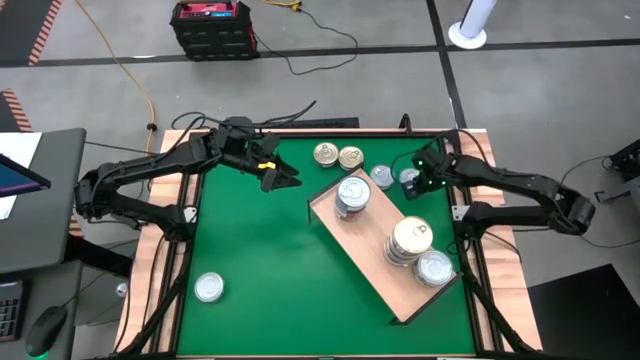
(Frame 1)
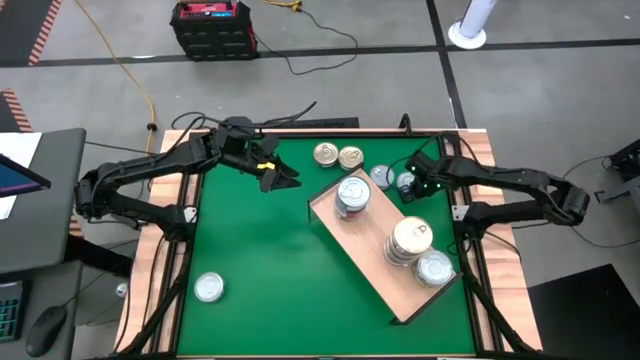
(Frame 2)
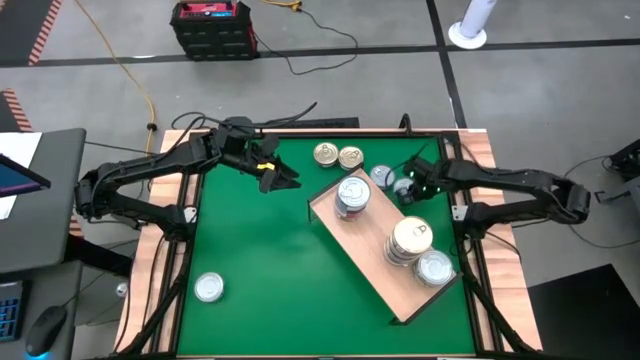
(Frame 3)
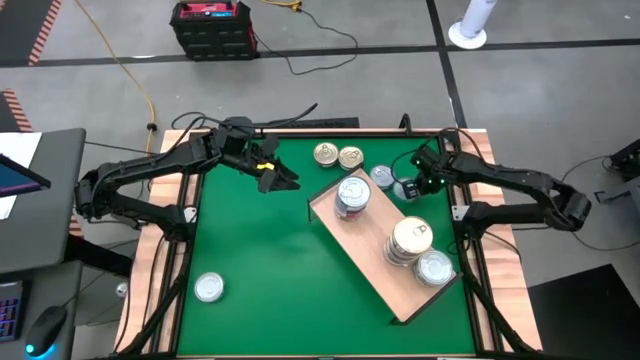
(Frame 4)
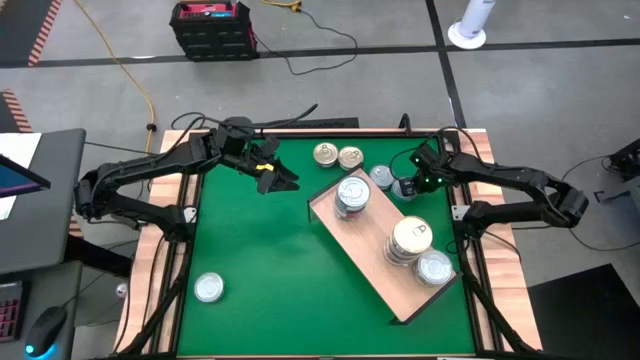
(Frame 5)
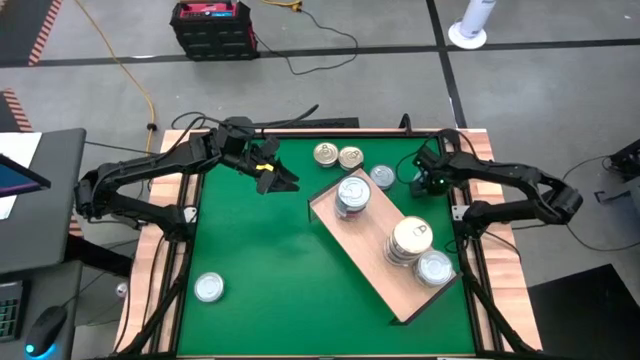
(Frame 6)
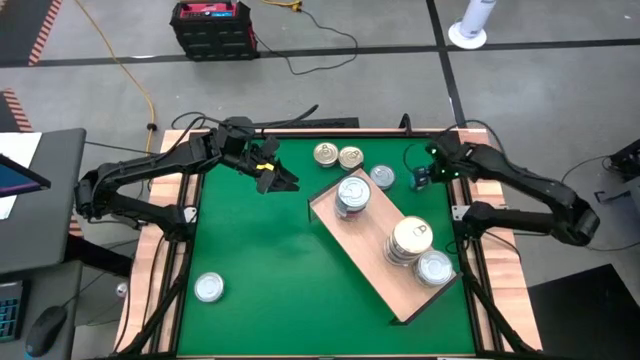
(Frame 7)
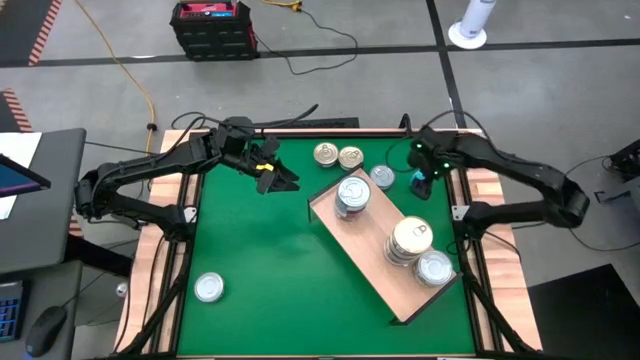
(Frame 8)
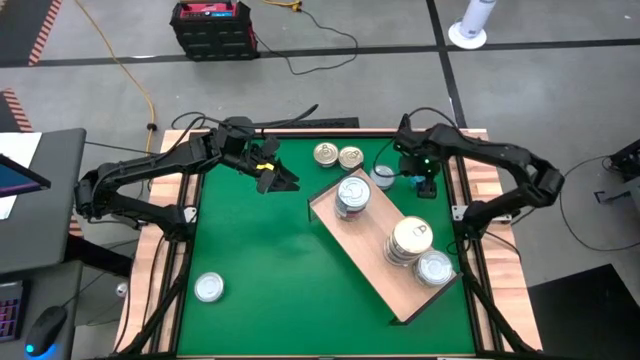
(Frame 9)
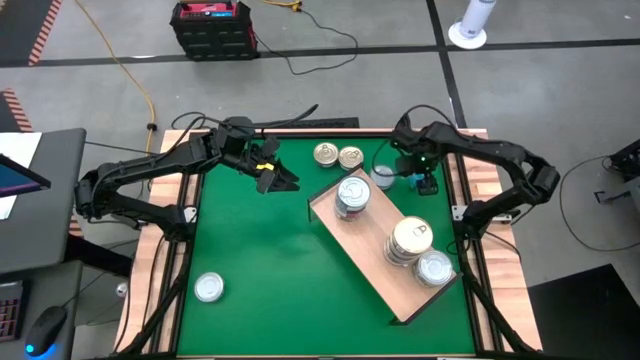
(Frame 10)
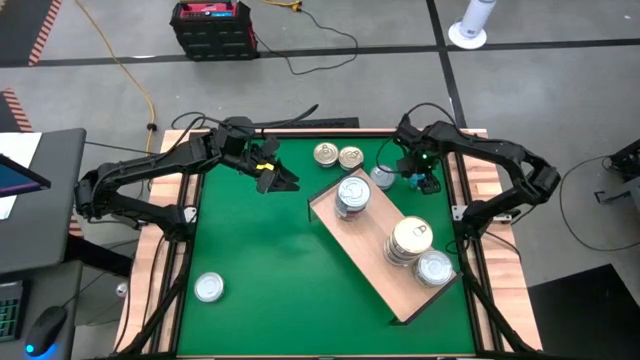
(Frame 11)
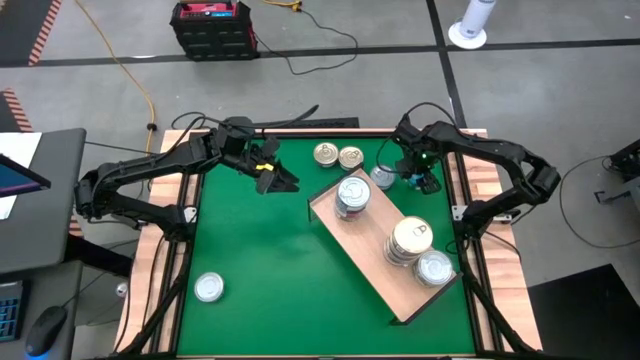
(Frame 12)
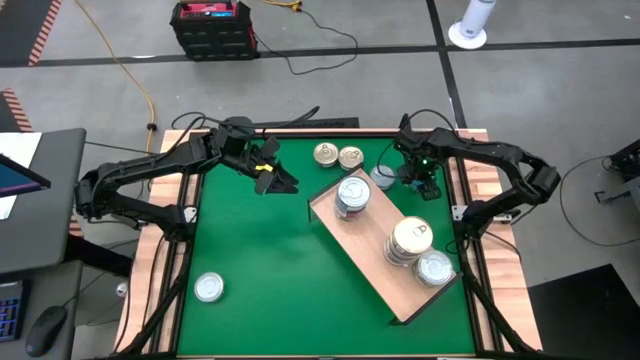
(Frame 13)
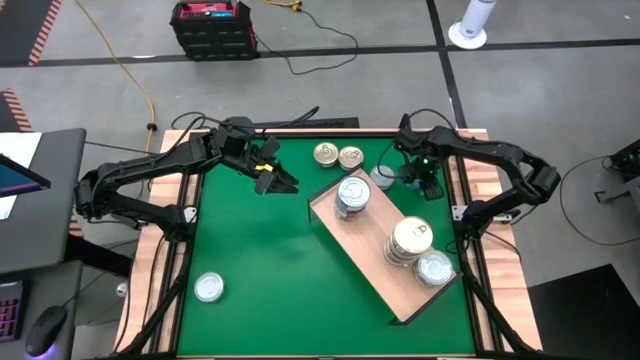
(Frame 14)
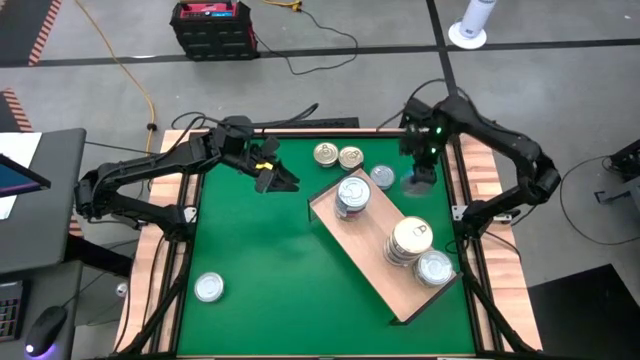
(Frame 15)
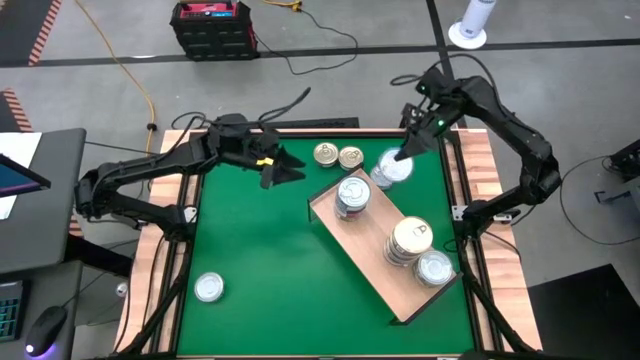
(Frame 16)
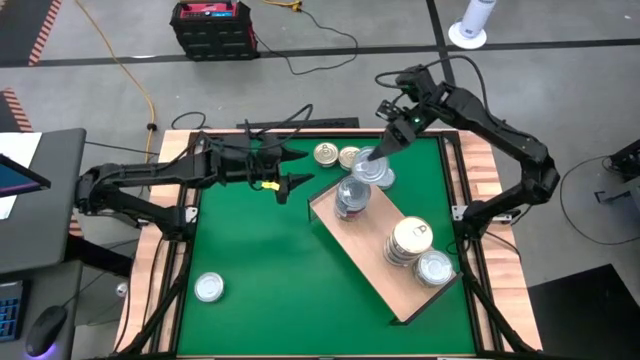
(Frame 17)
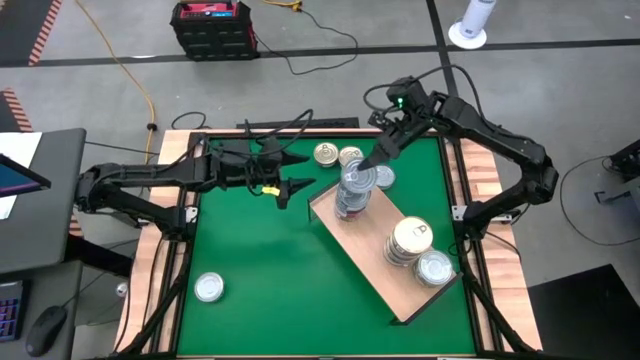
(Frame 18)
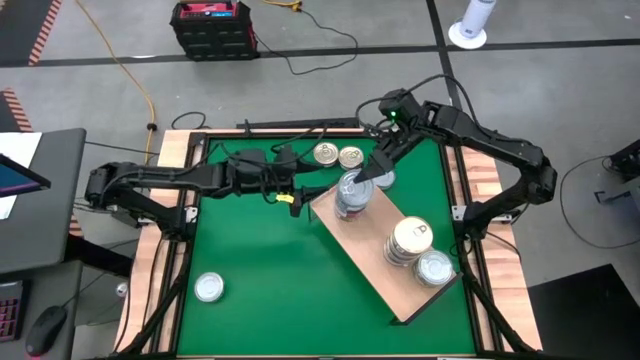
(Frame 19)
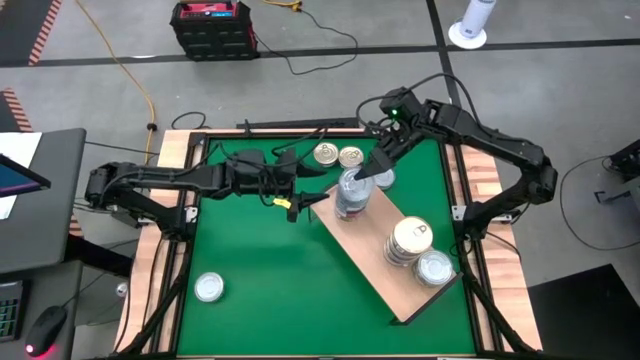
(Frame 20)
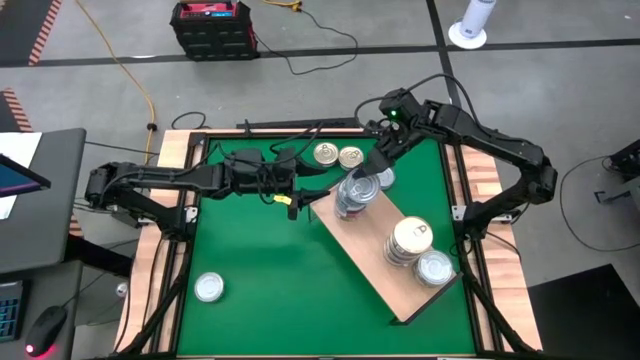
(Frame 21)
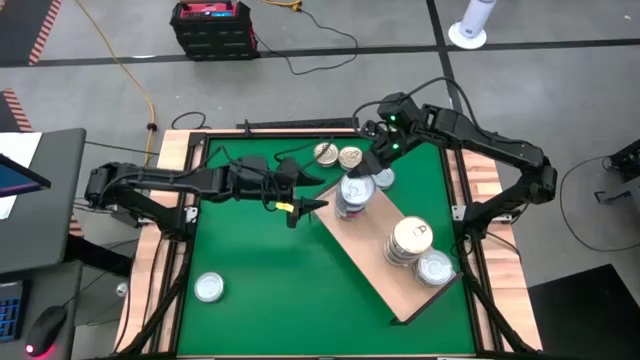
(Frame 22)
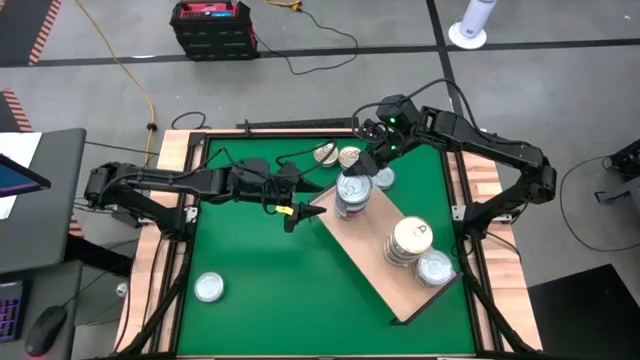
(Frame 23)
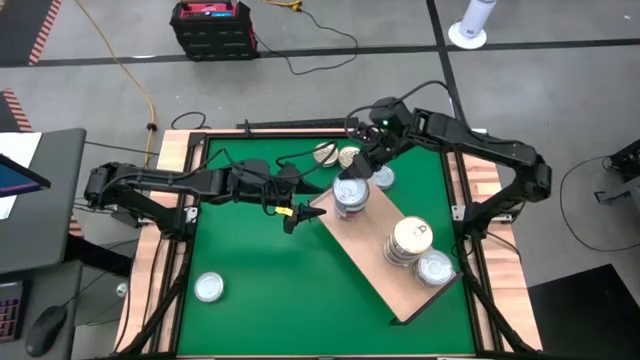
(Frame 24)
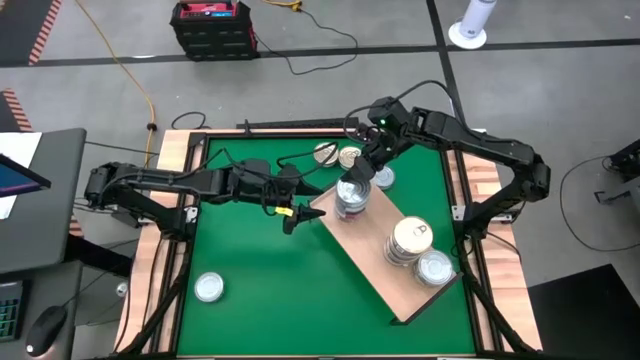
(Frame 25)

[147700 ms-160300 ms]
Task: Stack canned seafood by type on shelf
Stack the light blue tuna can on top of the blue tuna can on the shelf

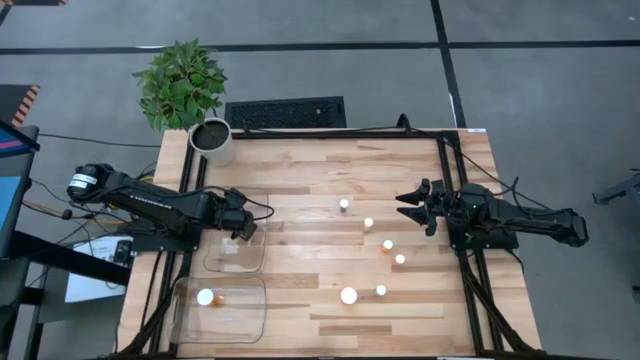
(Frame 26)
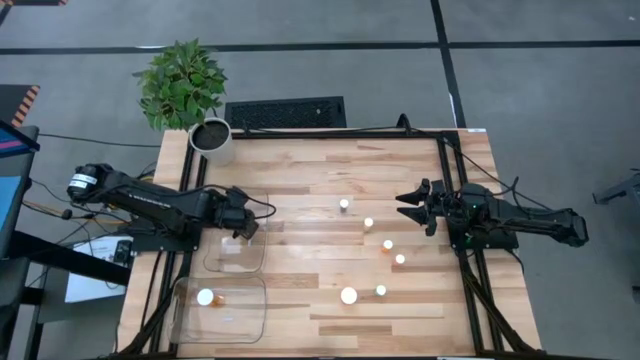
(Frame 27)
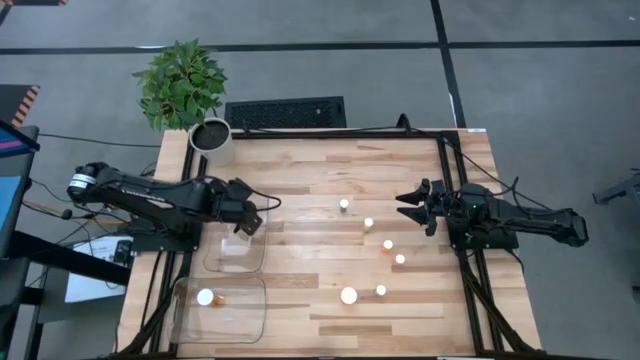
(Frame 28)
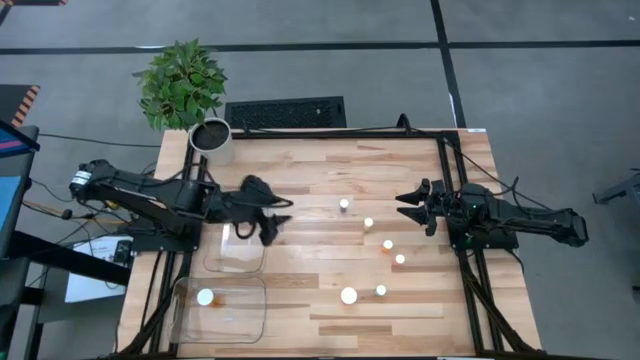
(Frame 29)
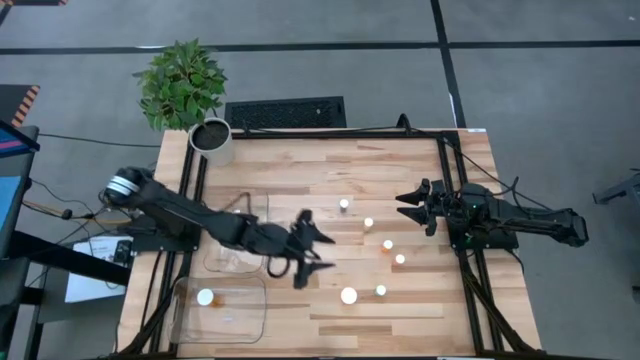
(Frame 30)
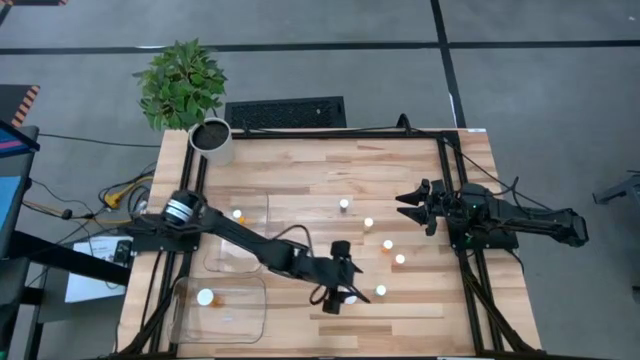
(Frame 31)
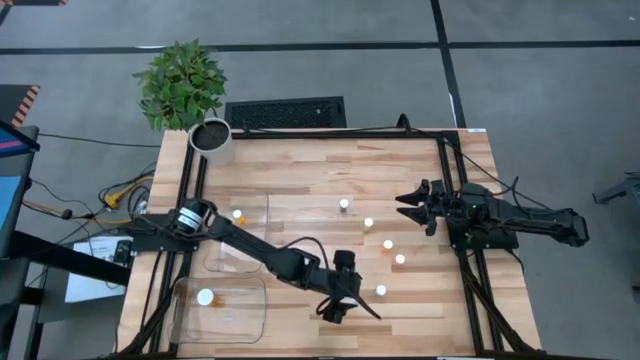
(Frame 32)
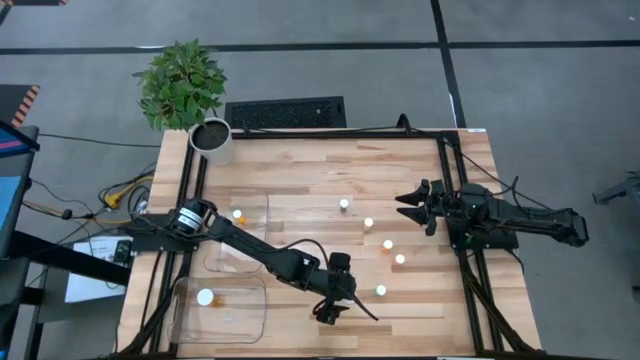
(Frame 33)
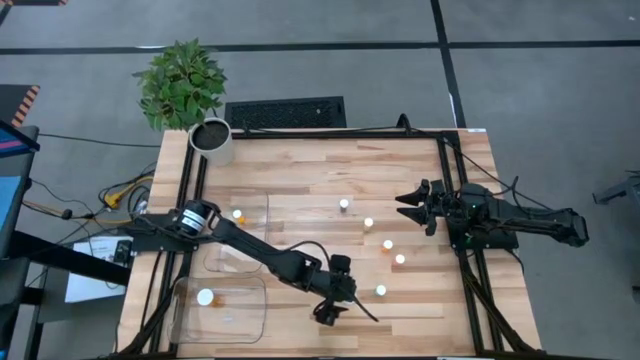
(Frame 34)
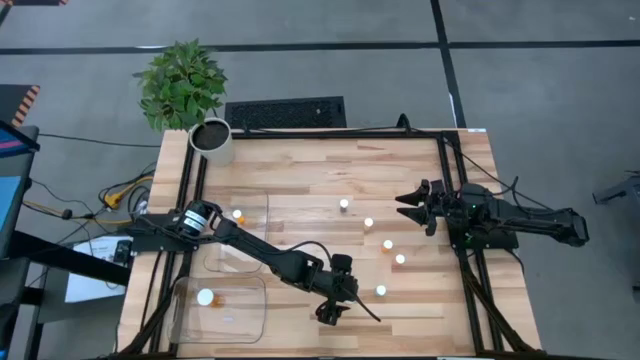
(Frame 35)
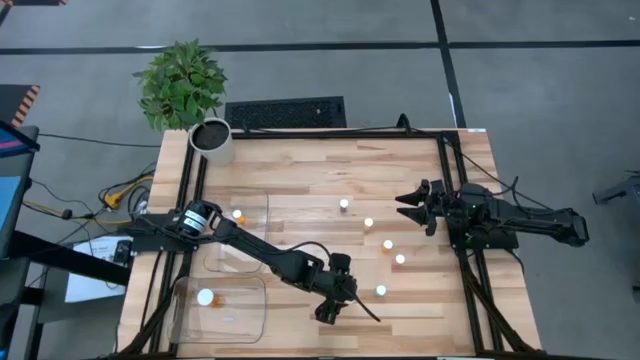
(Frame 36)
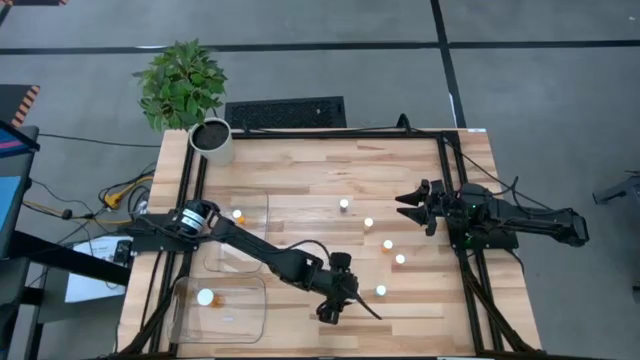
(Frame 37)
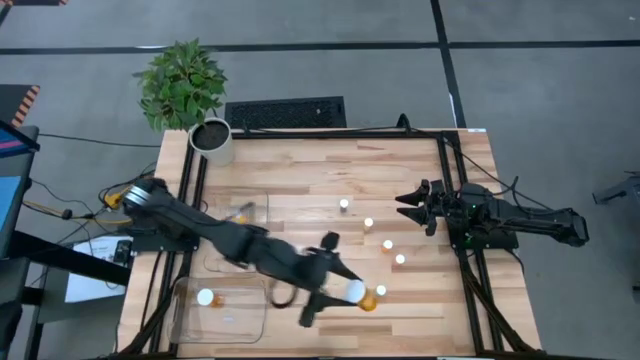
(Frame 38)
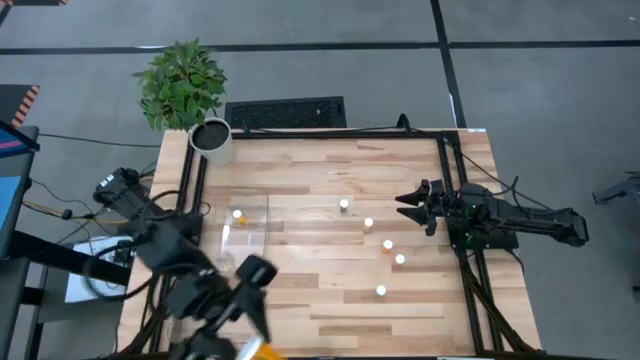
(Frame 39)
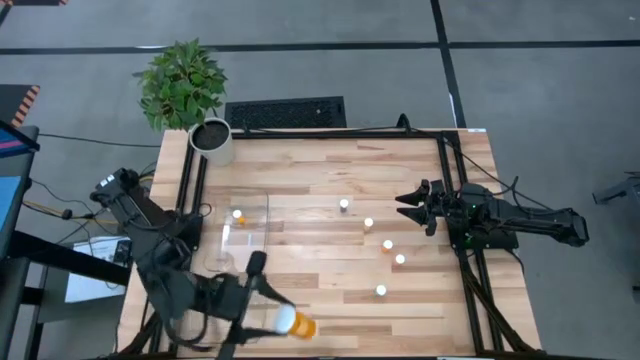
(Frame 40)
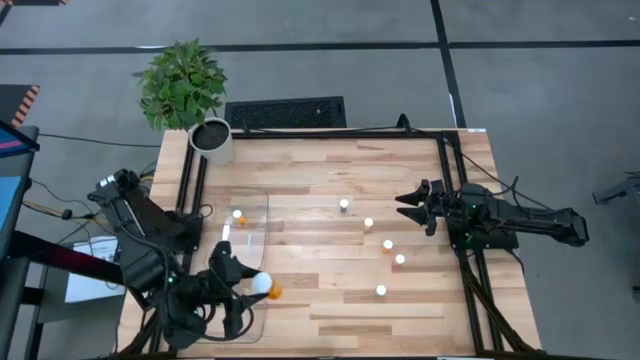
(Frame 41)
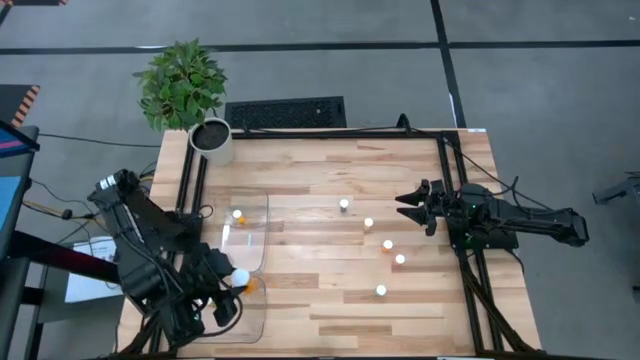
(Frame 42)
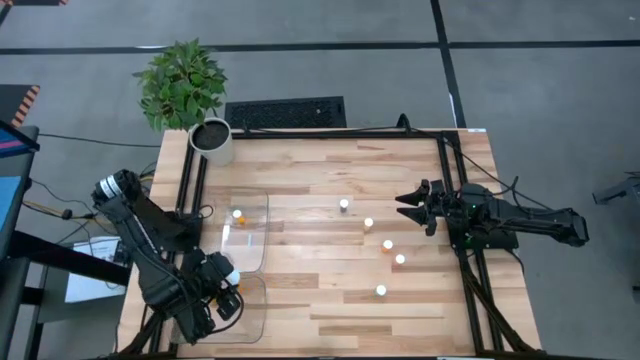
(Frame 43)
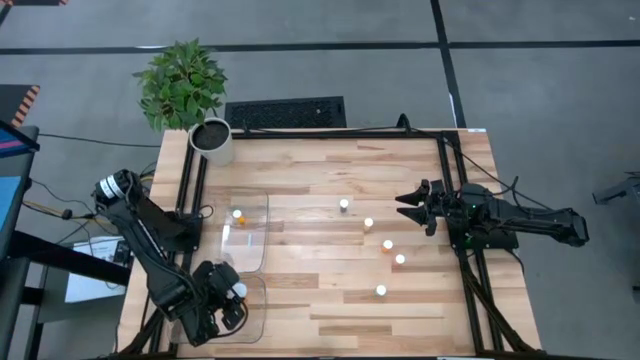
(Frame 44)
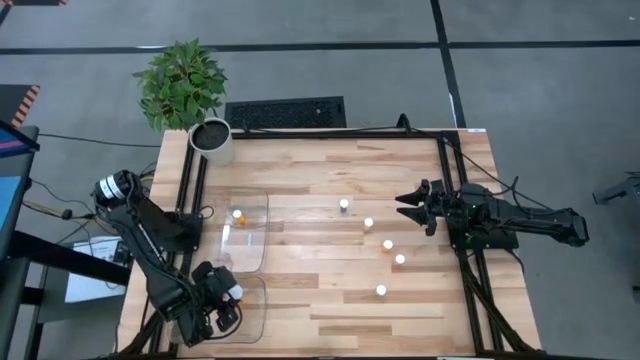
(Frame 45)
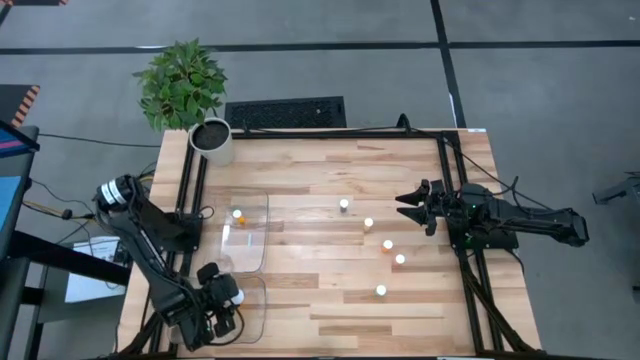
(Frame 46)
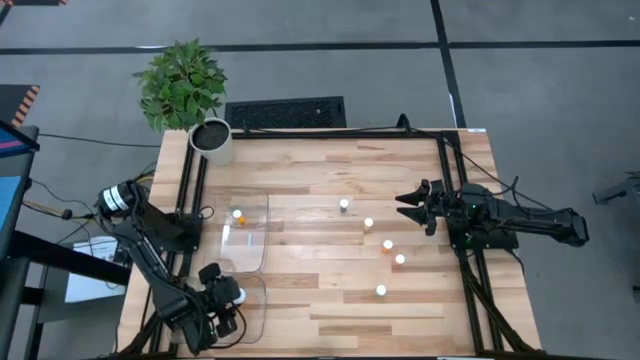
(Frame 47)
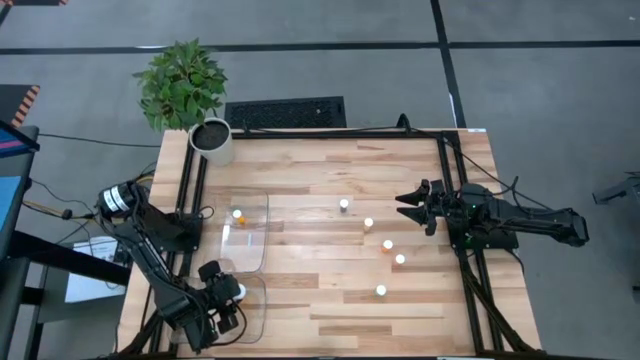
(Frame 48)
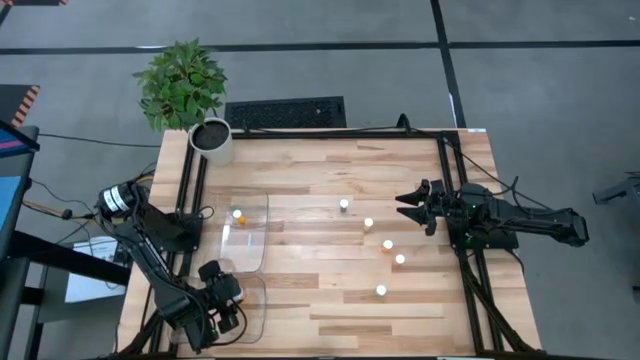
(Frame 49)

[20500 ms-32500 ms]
Task: Pick and place medicine bottles into bin by pill shape (circle, oval)
Put the bottom orange capsule bottle into the bottom transparent bin
